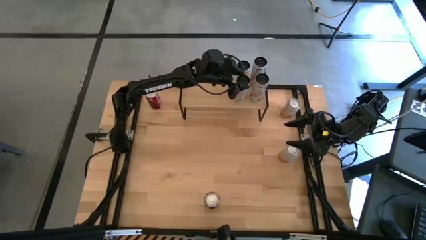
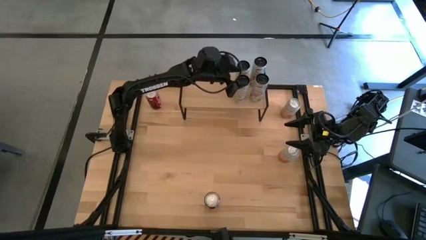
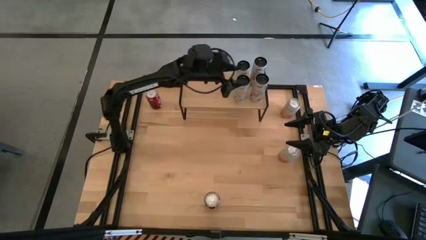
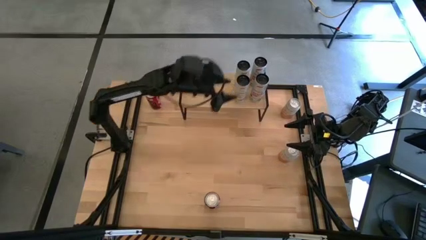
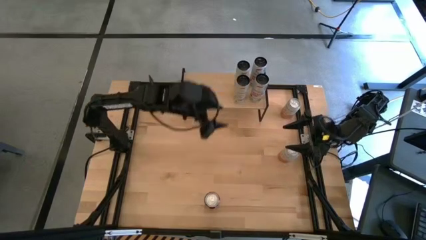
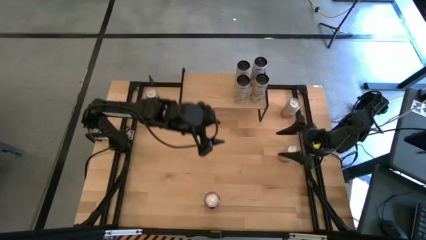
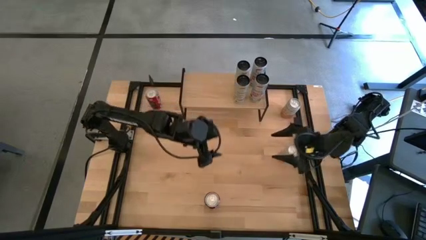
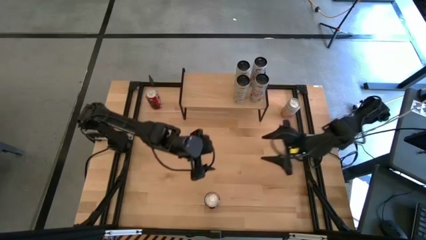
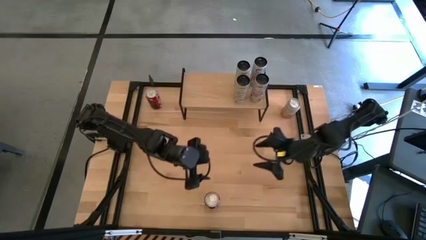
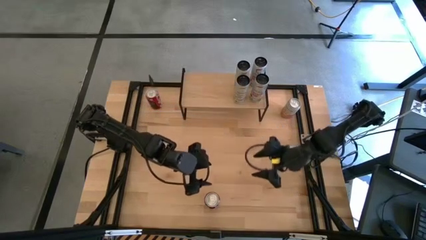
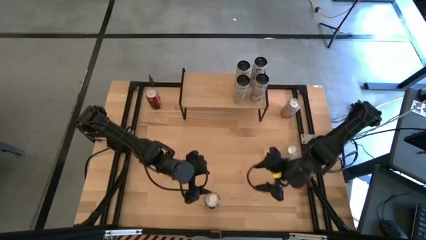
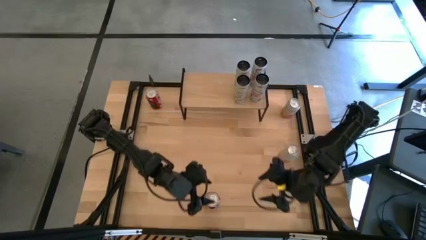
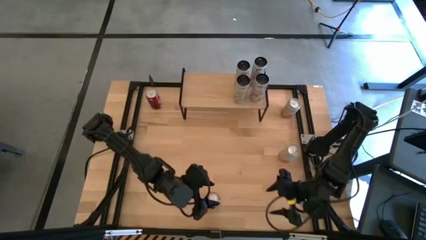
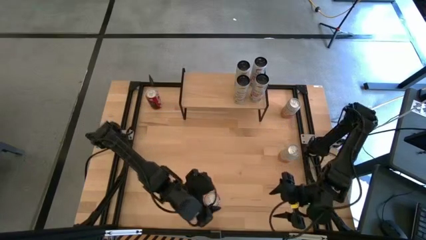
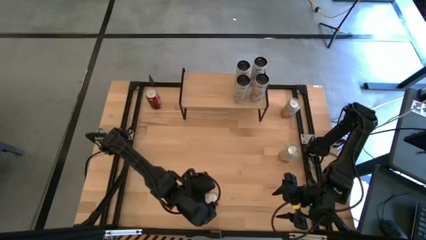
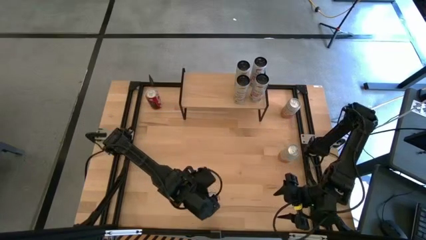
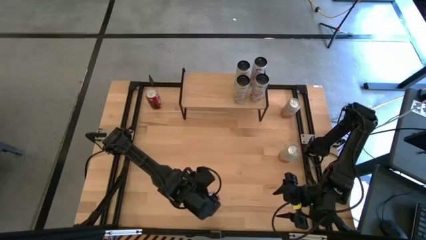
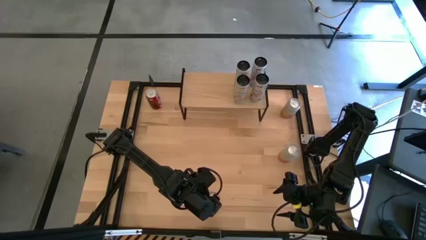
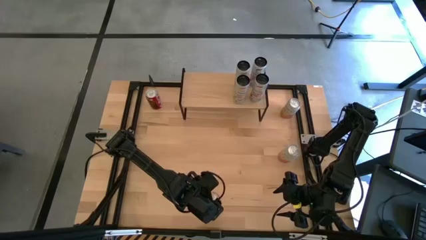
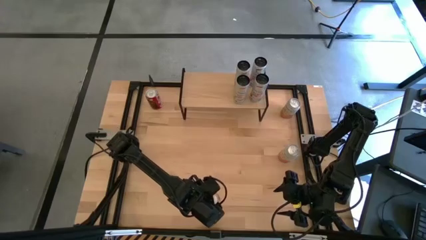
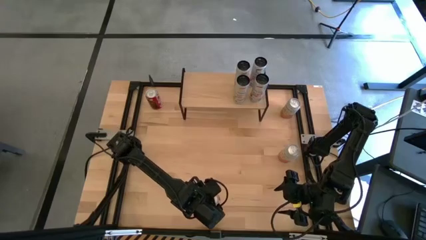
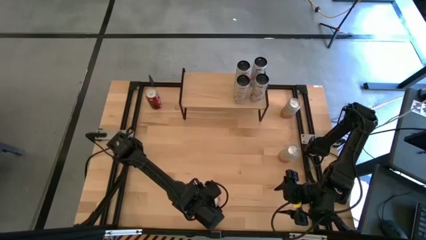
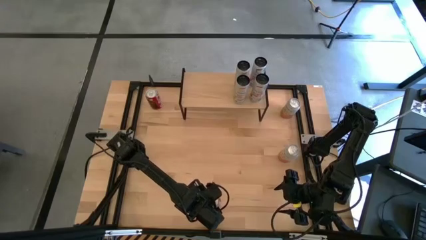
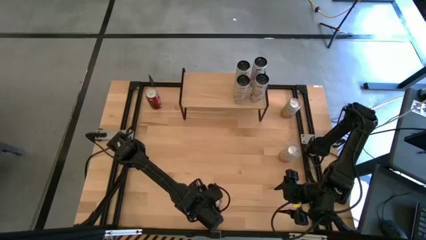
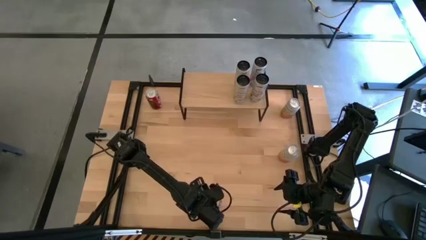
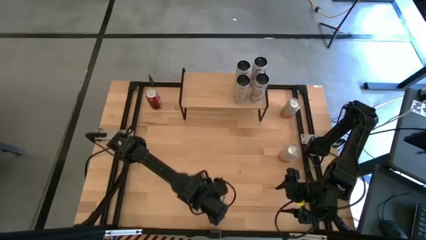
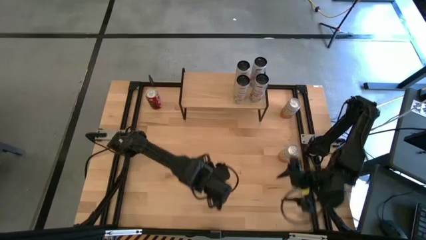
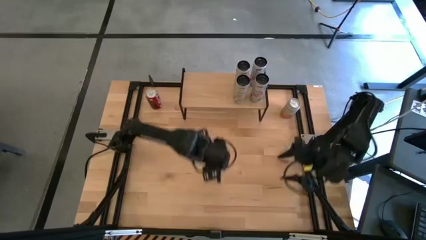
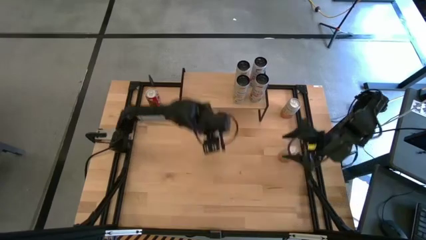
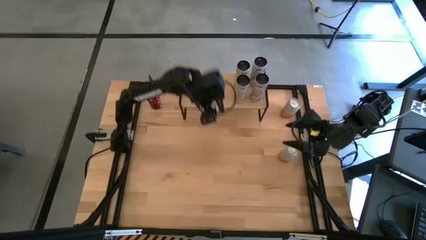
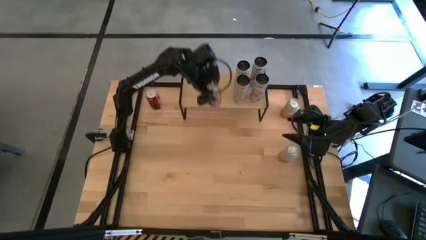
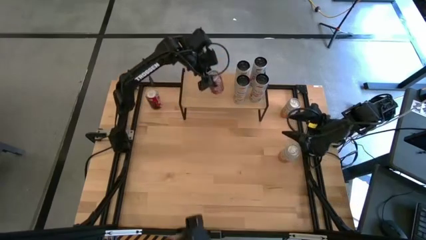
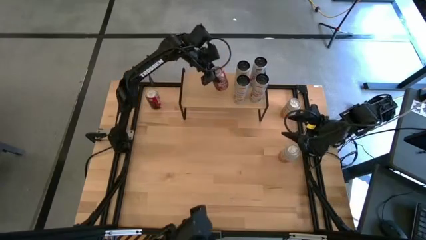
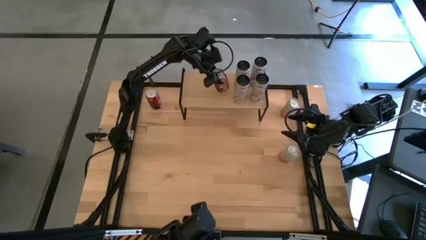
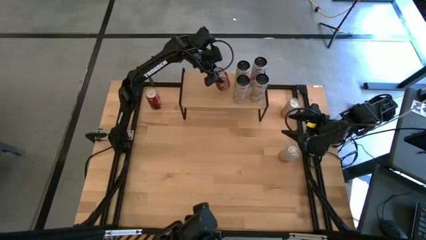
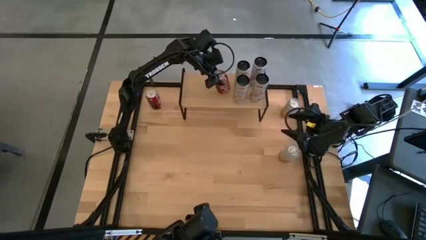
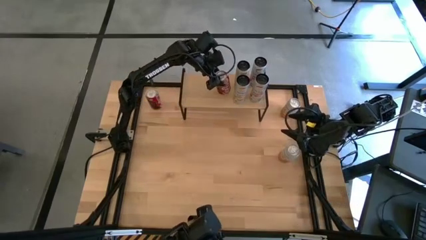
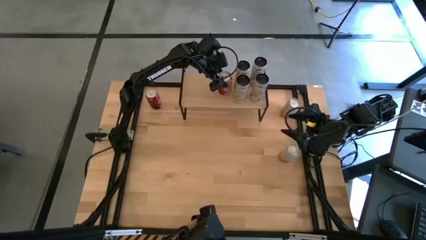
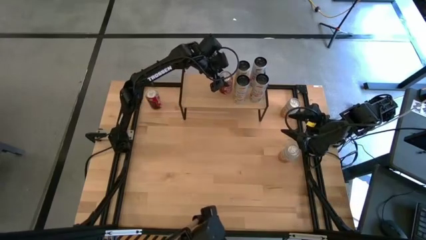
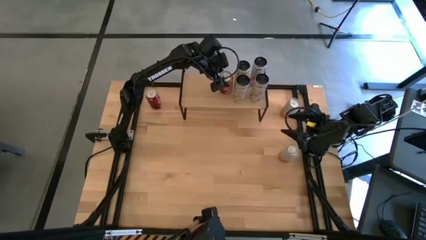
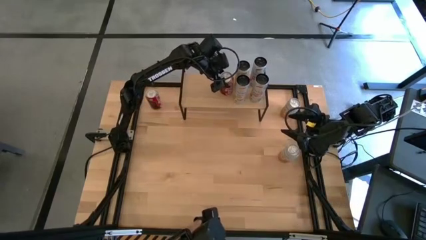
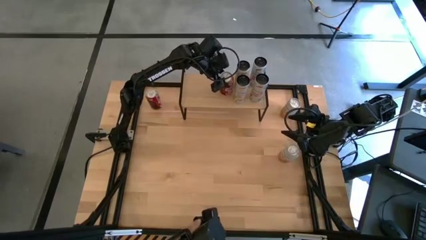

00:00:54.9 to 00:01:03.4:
Task: Place canned beverage on shelf
Put the bottom red-white soda can on the shelf

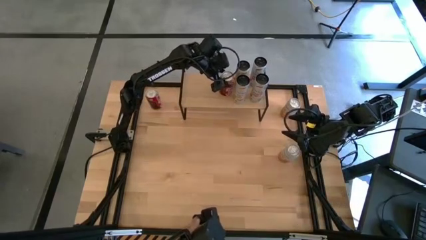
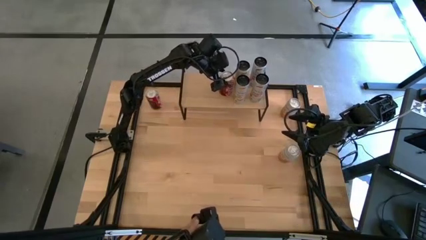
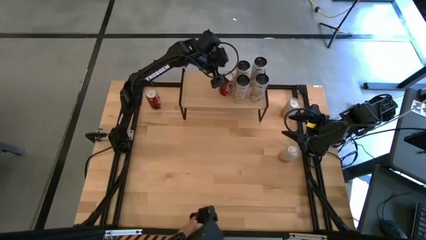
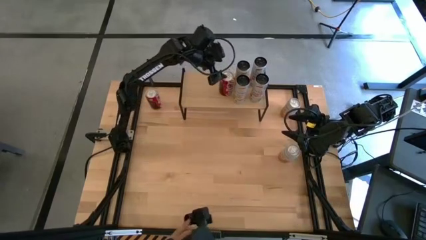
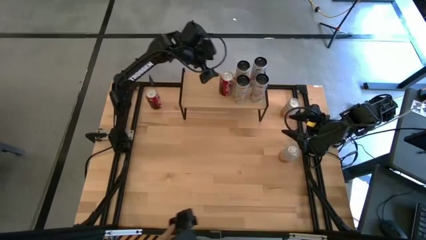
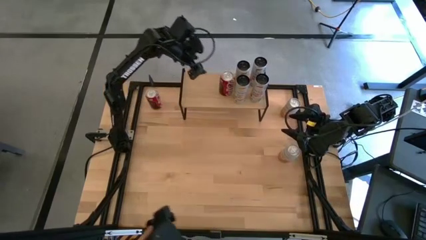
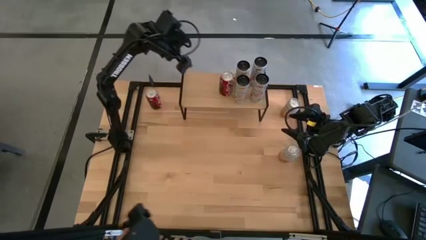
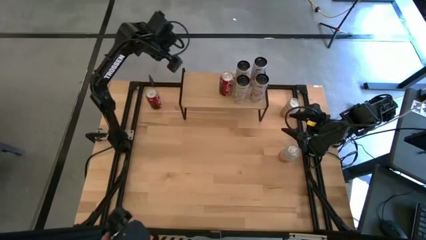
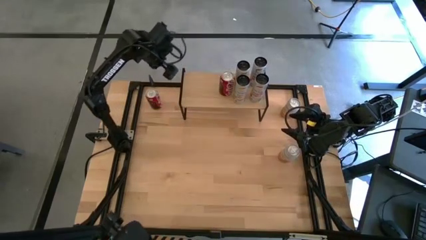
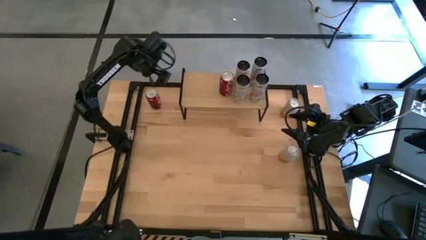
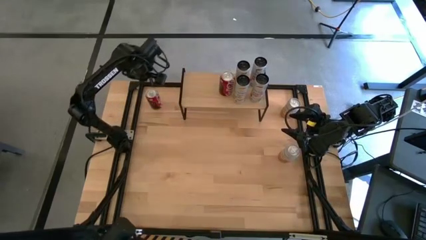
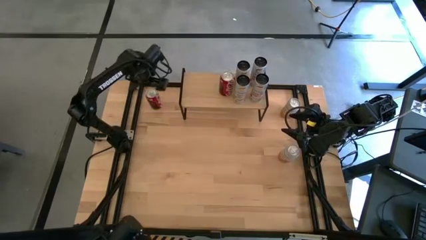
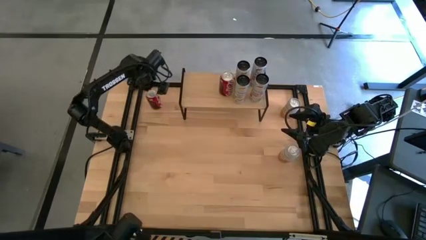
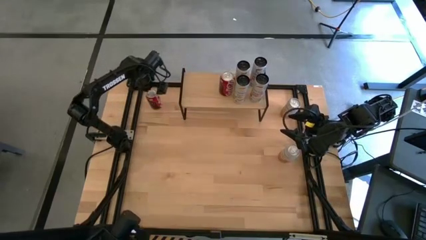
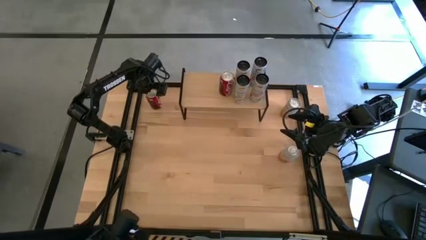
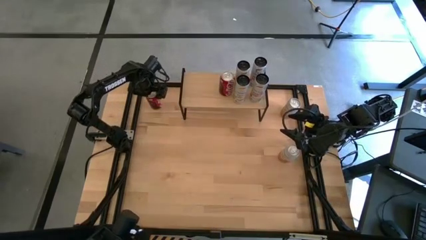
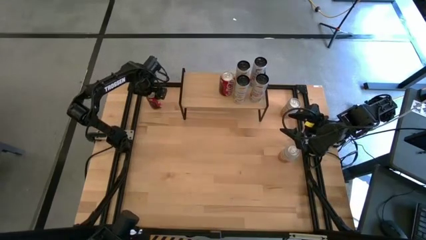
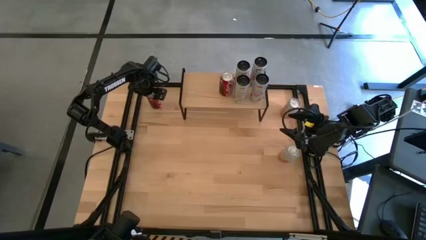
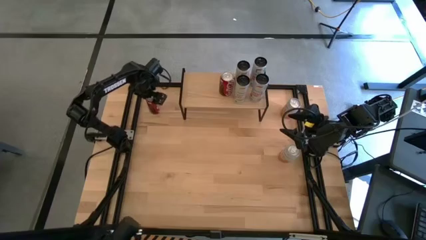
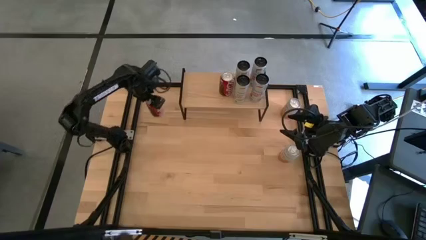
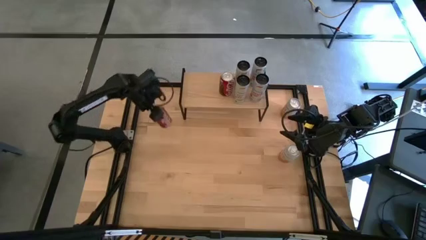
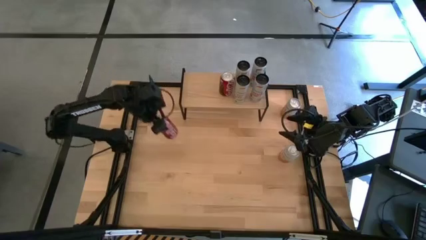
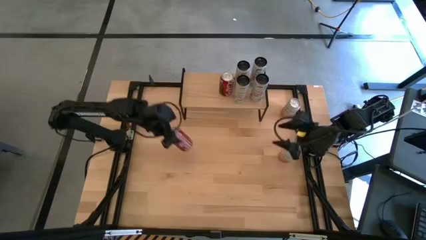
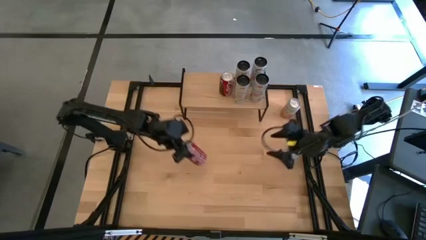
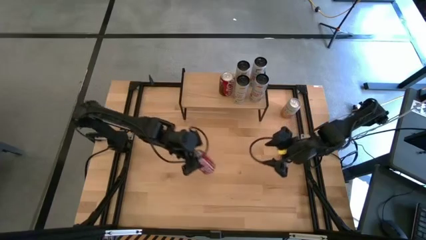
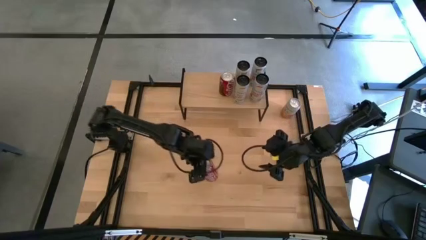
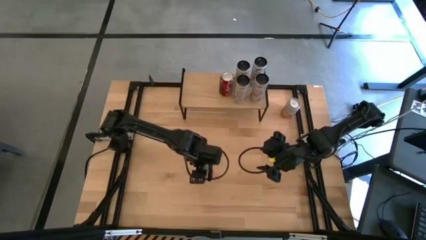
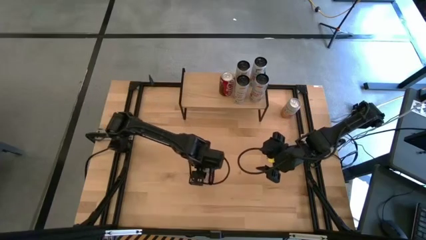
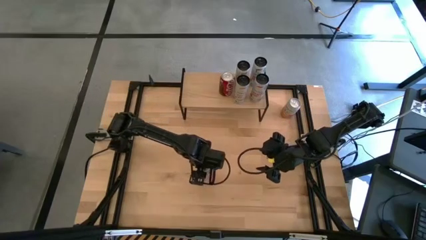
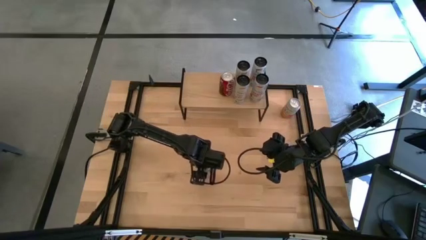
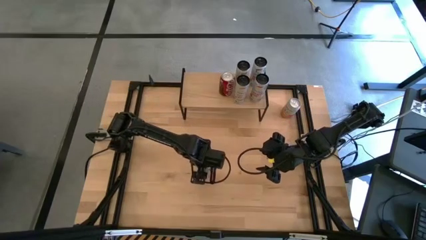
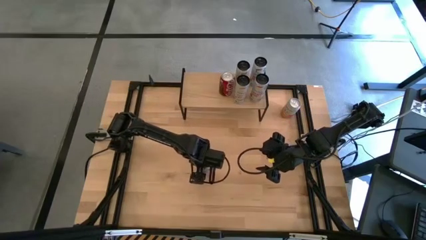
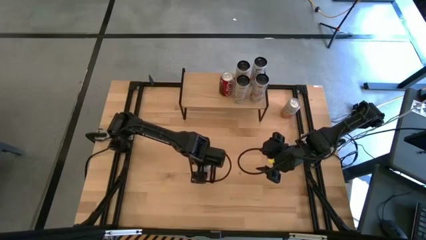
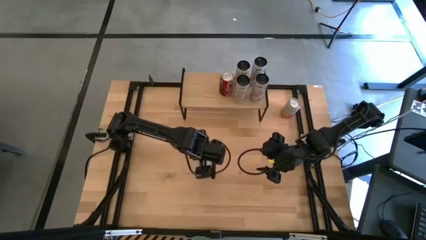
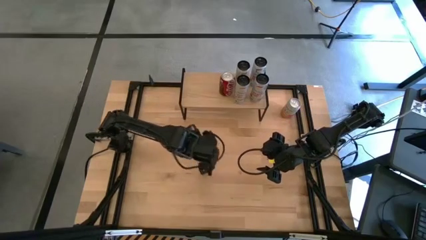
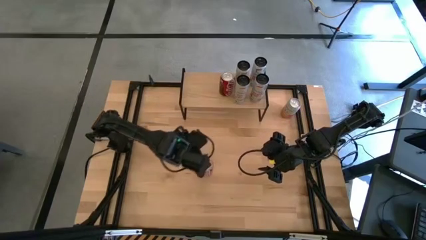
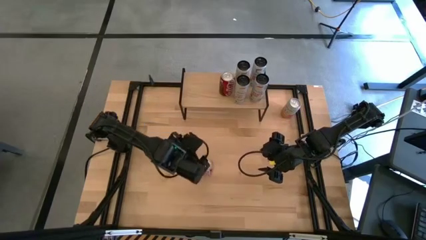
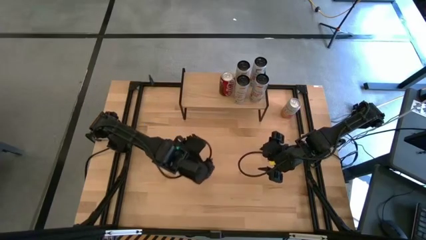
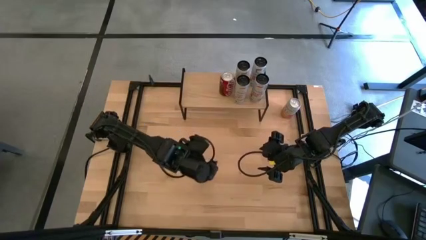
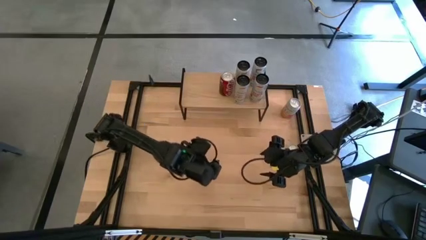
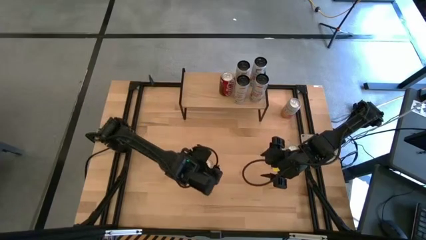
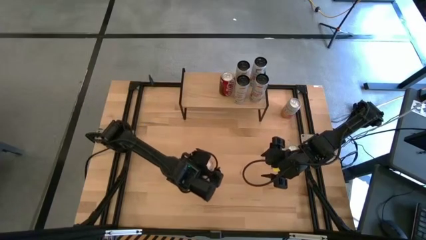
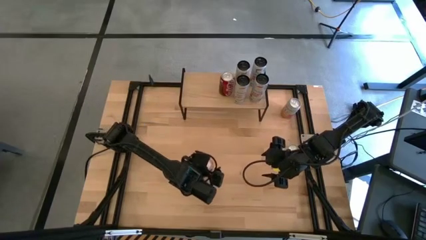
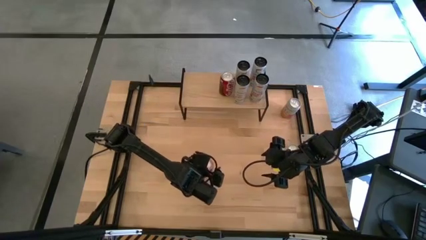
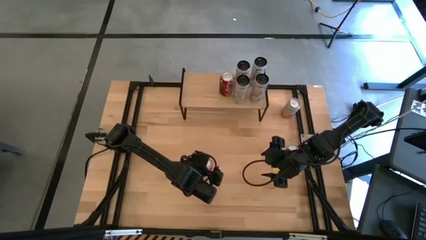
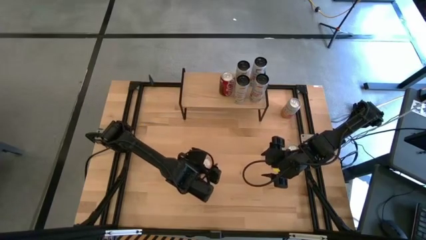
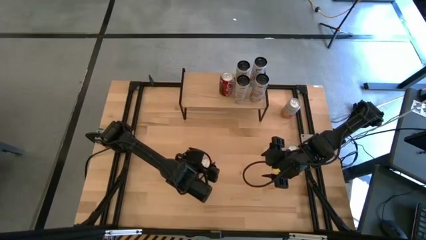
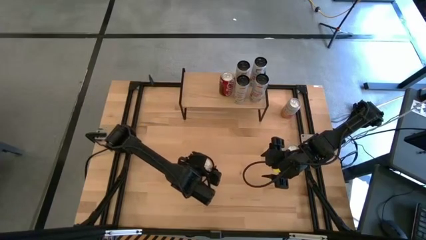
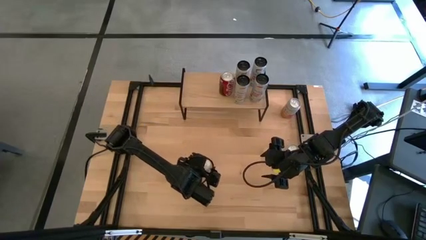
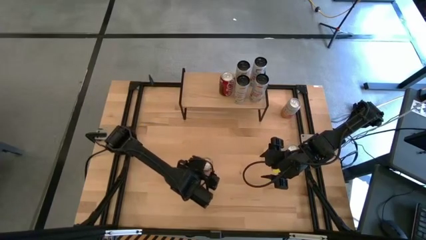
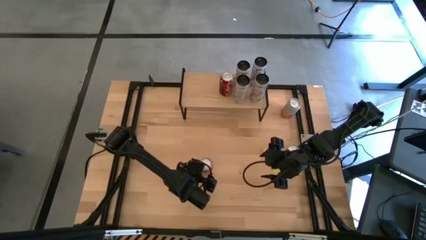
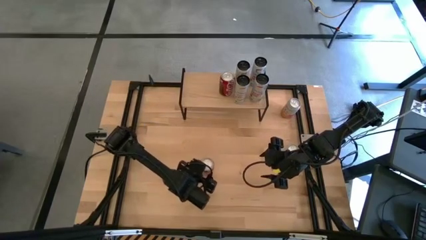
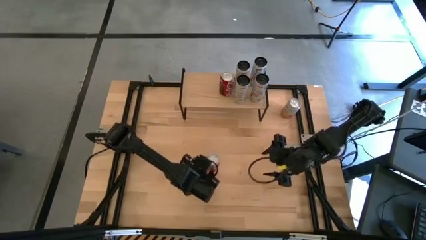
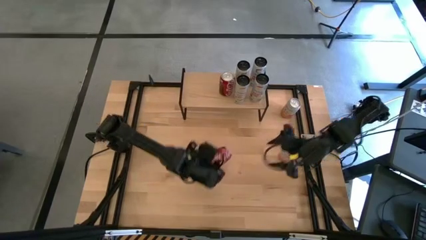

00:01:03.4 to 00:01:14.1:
Put the red-white soda can on the shelf aligned with the other red-white soda can
